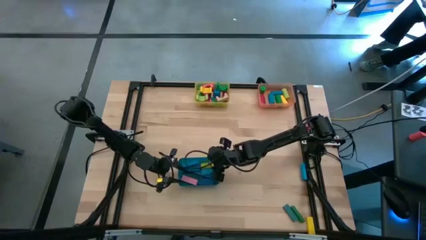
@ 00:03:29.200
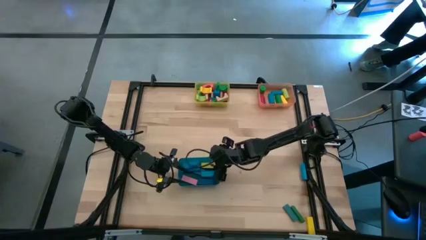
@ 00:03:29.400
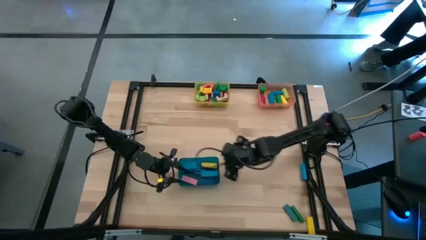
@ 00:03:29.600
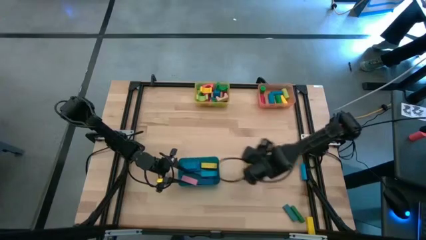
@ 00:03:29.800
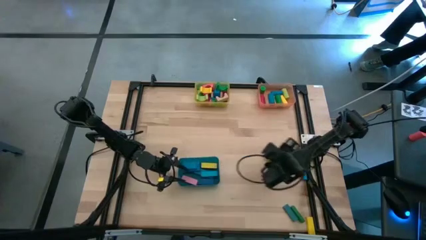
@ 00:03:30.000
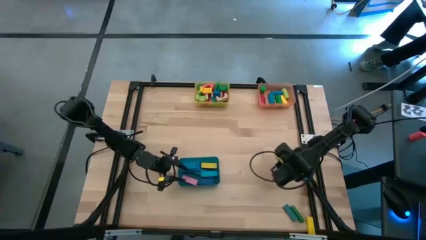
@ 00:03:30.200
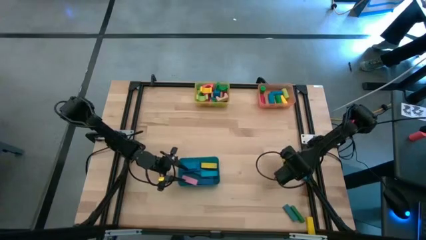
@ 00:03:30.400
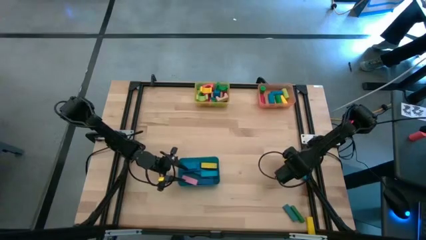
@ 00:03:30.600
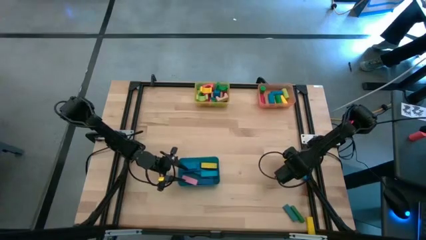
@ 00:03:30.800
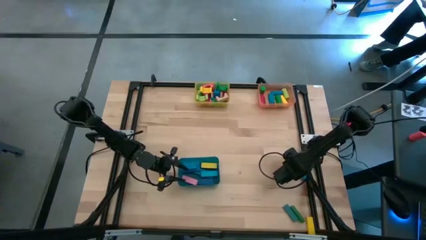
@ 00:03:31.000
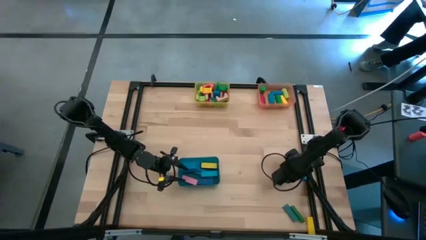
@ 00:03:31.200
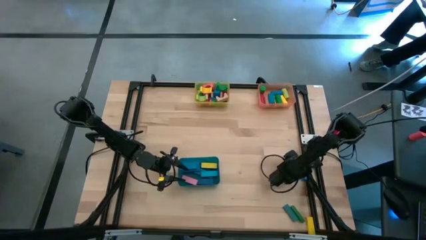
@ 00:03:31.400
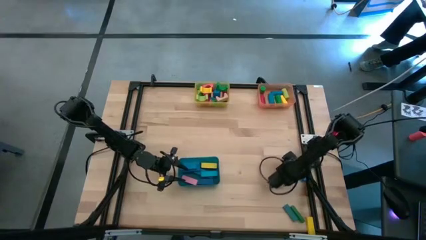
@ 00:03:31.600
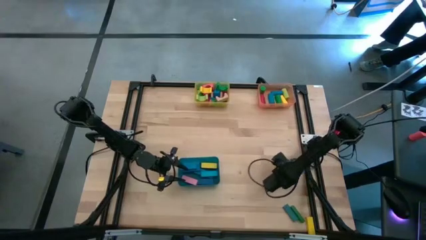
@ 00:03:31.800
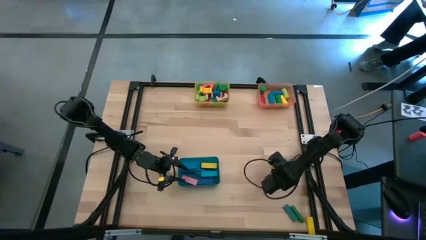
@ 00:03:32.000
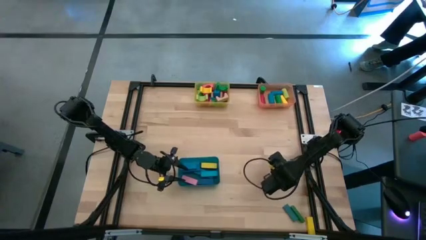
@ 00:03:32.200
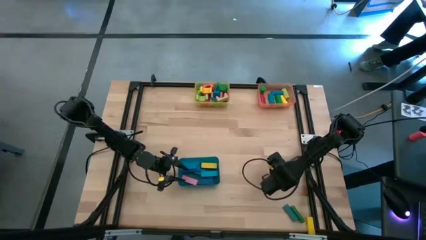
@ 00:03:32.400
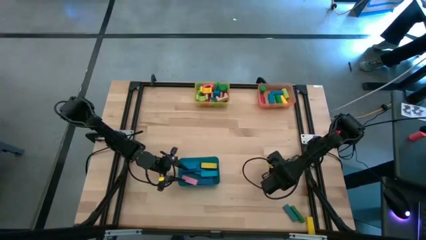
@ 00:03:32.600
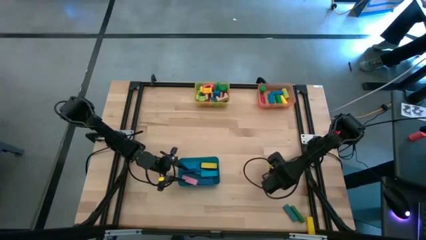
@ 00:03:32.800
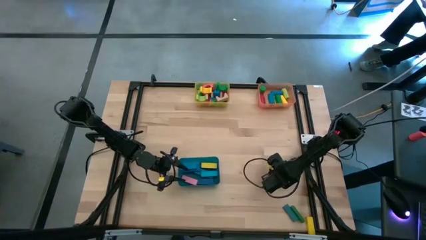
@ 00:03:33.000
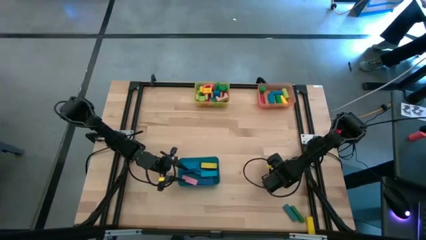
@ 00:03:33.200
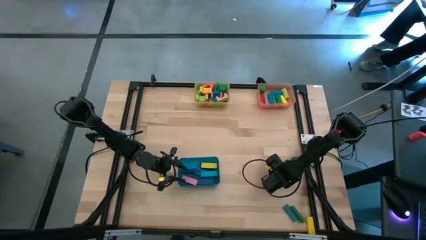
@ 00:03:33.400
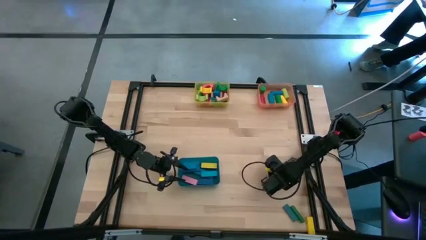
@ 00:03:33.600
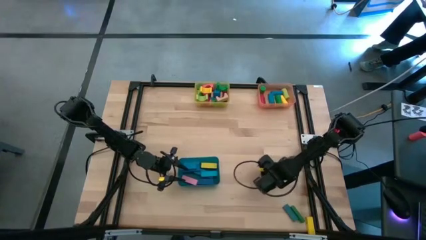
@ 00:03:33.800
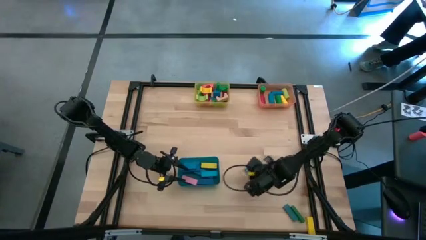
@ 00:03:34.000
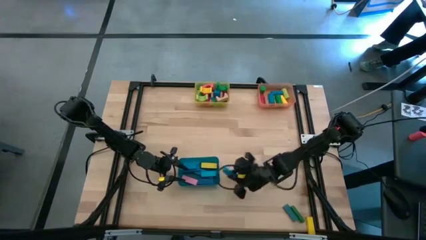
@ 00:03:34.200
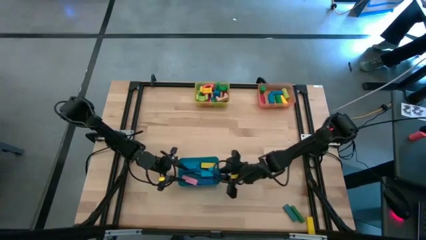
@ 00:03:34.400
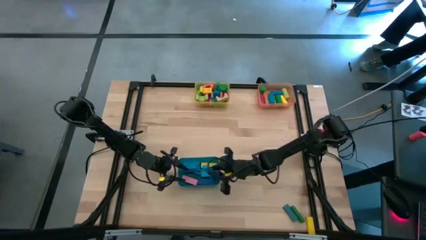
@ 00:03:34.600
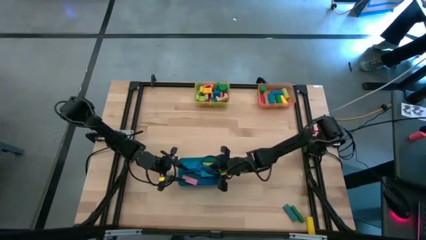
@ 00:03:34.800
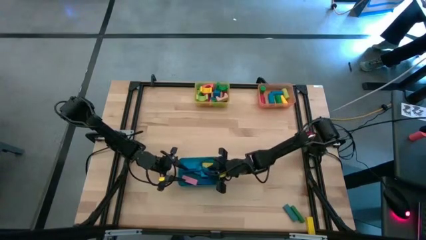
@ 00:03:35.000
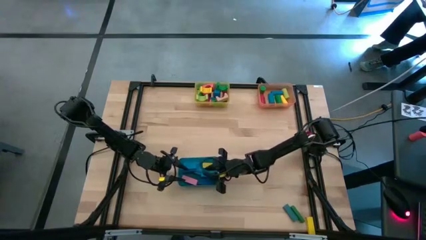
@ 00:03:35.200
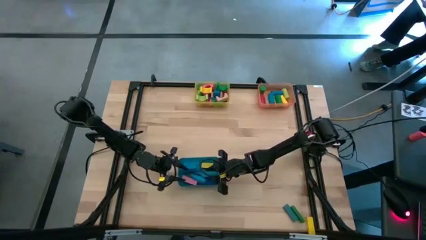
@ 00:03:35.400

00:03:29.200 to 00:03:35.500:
Task: Sort blocks by size
Put the blue rectangular block into the blue bin

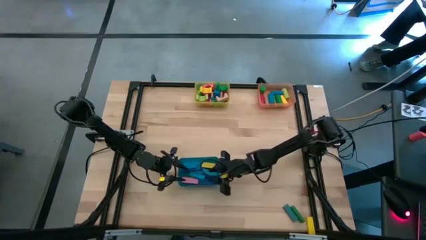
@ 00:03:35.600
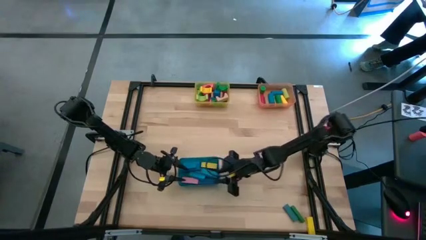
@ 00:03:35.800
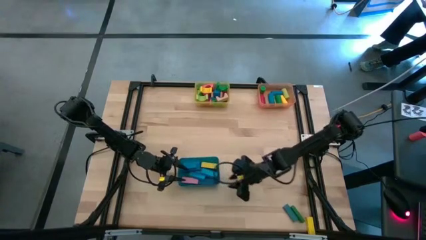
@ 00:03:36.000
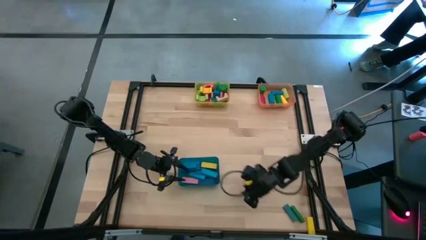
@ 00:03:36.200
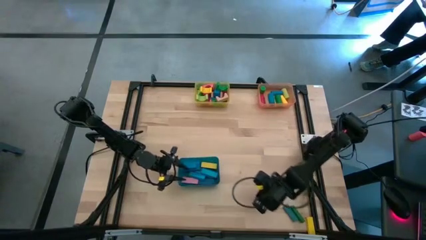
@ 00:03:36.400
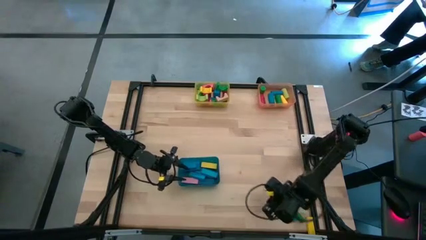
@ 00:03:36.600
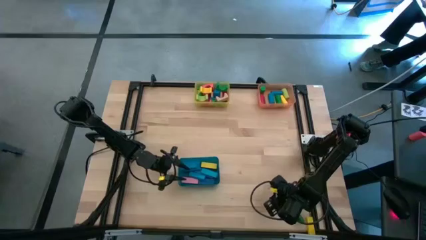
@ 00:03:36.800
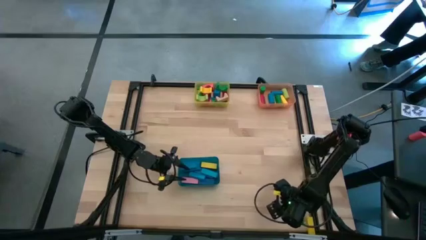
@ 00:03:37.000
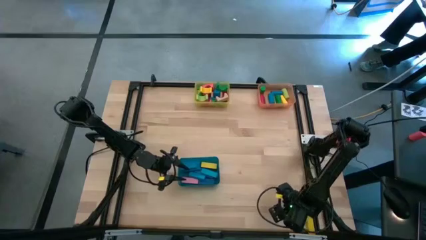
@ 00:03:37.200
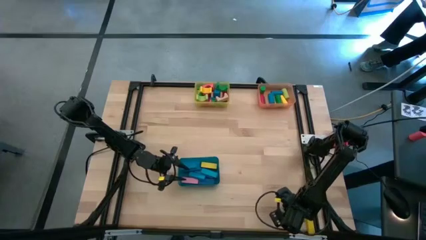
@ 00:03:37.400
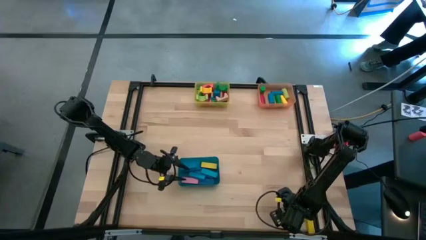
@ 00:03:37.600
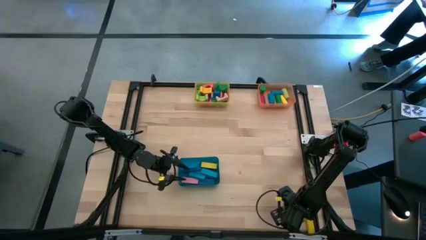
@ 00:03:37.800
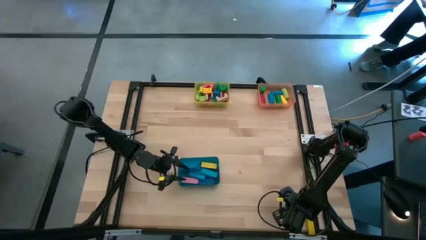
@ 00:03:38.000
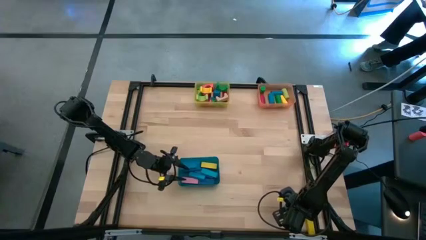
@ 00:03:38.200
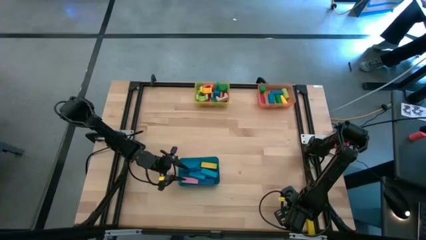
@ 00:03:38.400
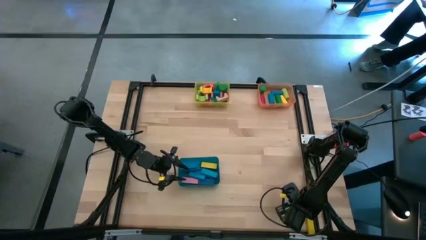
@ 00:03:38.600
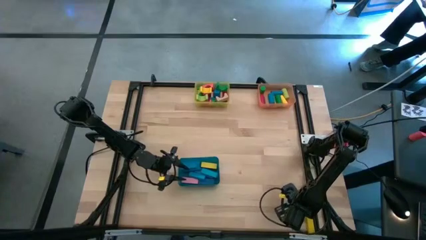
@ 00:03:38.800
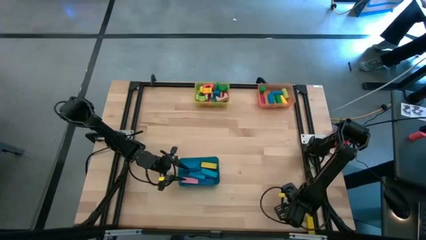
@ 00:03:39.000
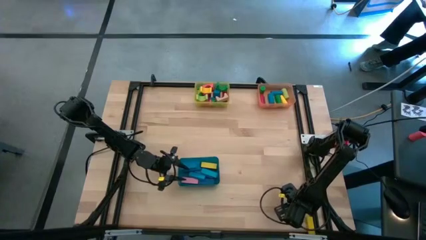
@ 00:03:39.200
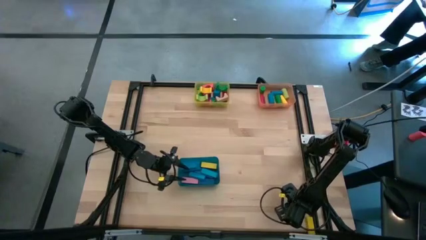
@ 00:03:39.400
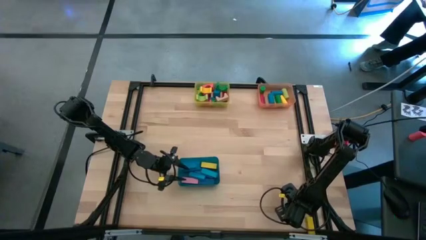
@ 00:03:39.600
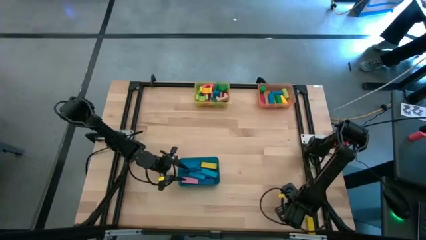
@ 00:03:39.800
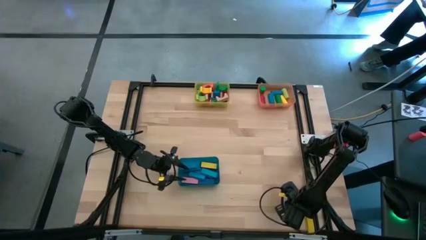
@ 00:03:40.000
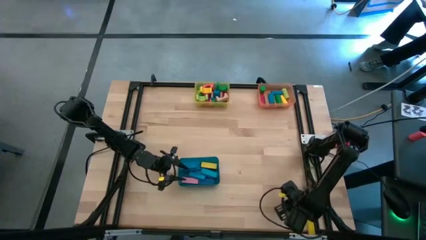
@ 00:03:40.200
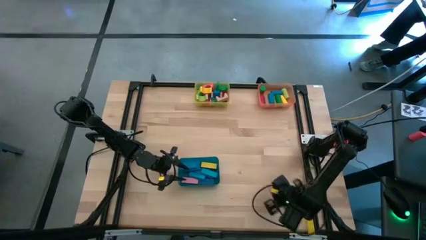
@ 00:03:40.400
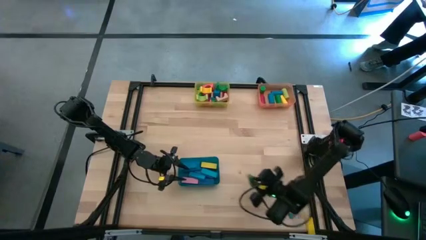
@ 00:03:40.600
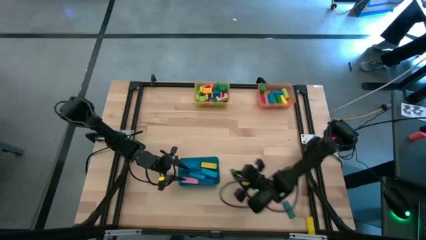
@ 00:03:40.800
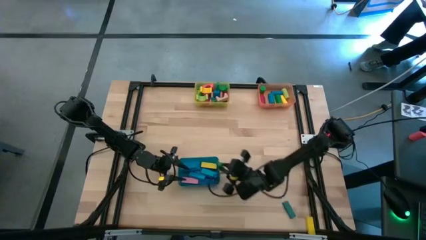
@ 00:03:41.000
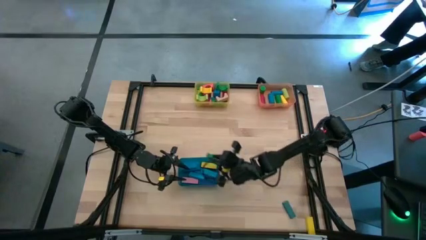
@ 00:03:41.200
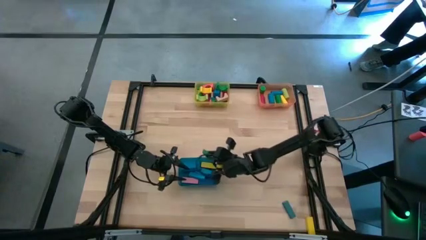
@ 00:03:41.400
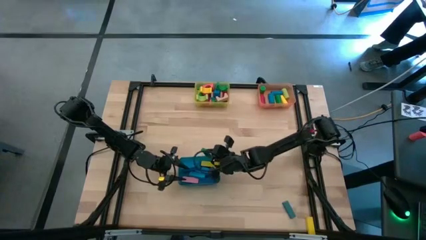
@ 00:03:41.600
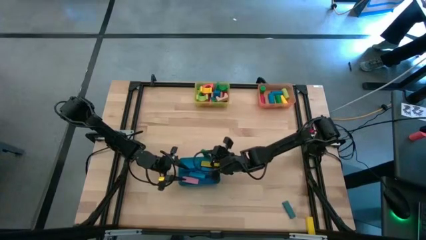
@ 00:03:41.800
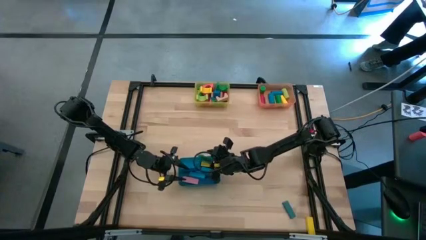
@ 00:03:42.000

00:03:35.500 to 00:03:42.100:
Put the green rectangular block into the blue bin

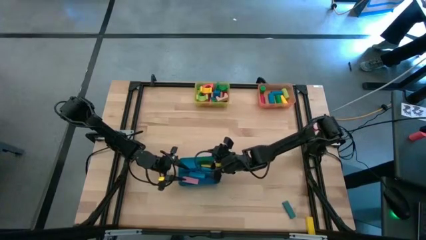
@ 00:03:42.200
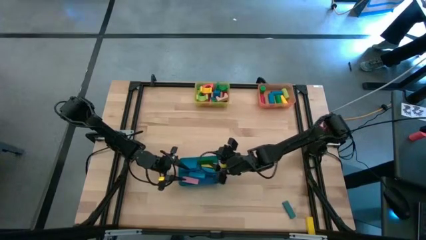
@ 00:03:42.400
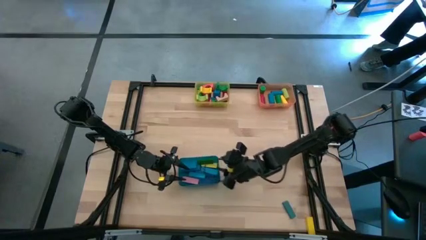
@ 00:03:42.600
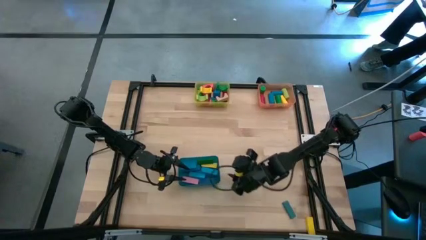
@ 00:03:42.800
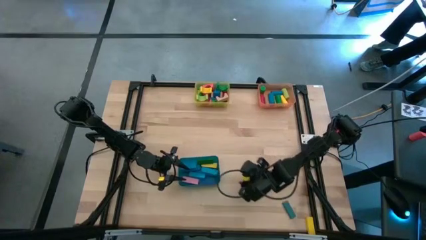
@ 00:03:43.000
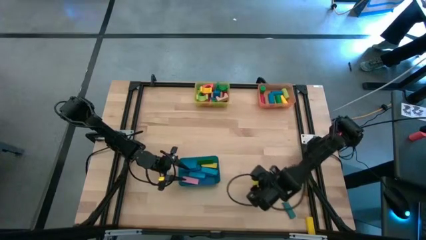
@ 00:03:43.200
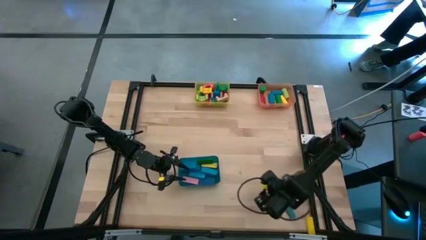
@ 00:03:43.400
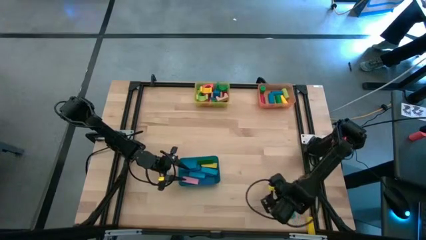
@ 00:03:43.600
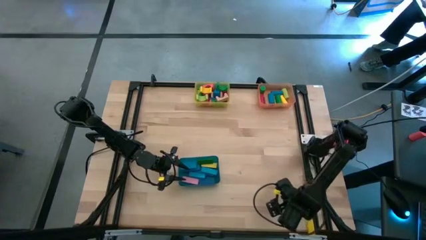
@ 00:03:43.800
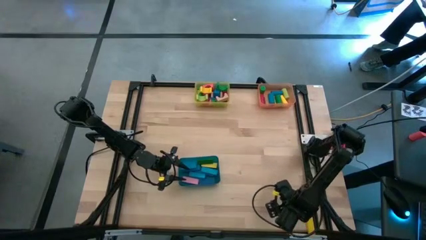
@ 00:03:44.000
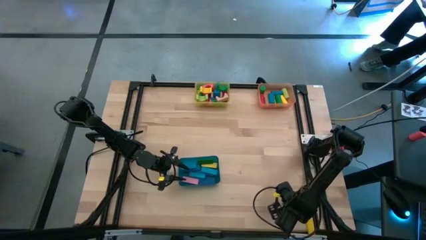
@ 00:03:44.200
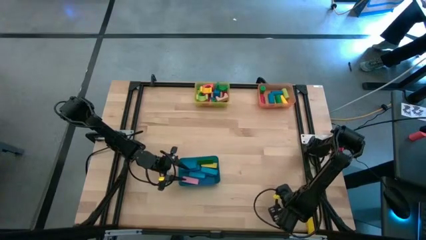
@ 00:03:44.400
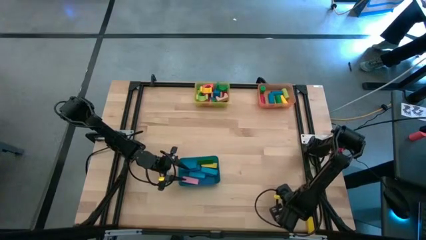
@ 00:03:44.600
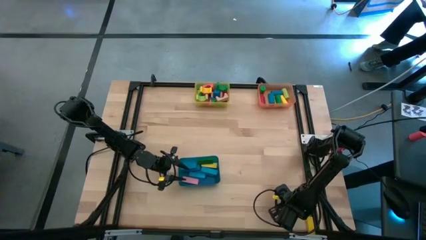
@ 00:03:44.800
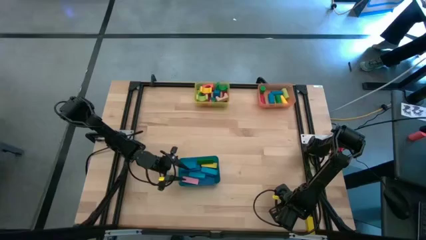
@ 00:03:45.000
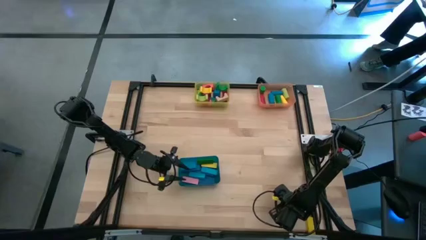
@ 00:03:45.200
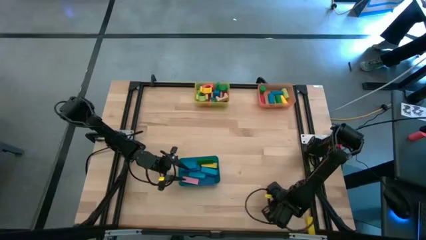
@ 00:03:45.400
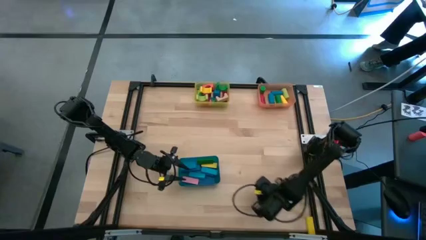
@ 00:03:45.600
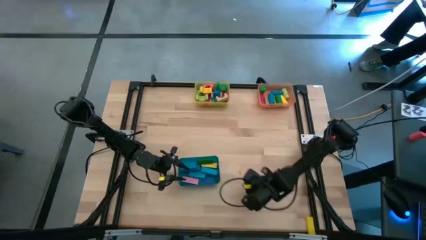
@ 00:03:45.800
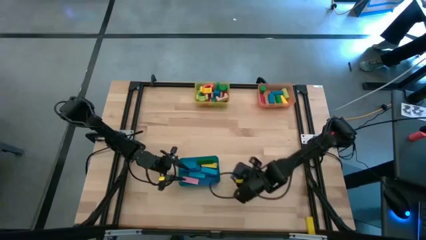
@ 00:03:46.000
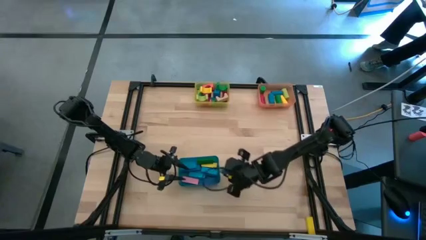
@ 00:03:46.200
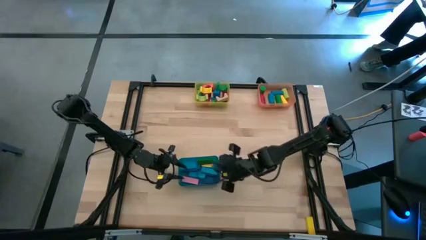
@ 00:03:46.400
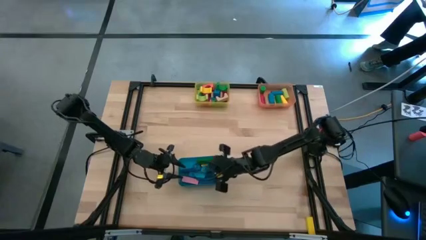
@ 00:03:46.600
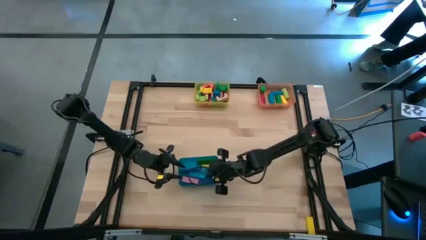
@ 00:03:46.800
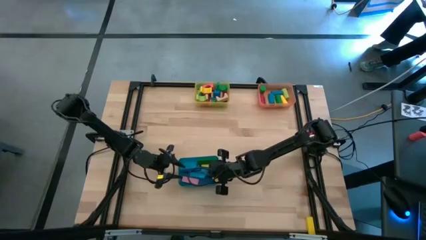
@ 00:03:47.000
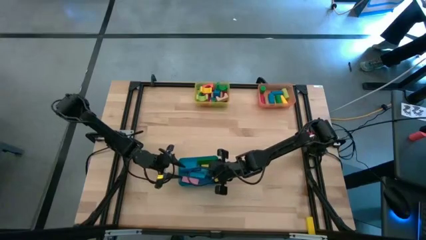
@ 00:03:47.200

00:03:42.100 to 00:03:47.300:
Put the blue rectangular block into the blue bin
